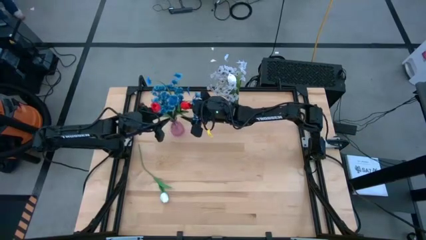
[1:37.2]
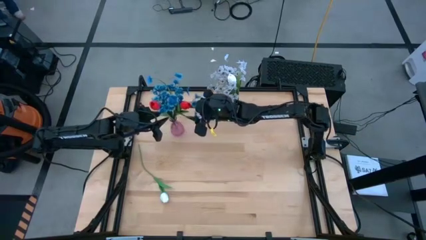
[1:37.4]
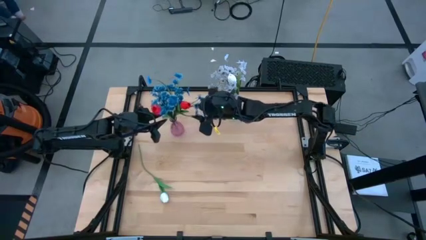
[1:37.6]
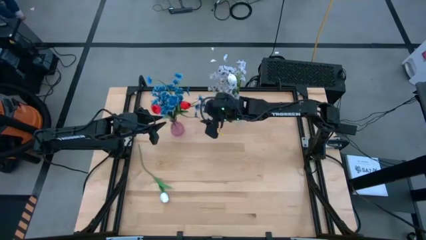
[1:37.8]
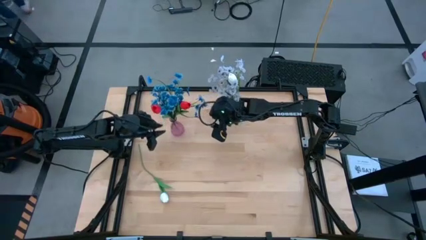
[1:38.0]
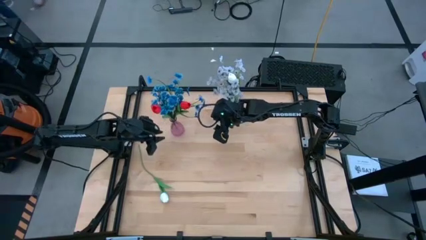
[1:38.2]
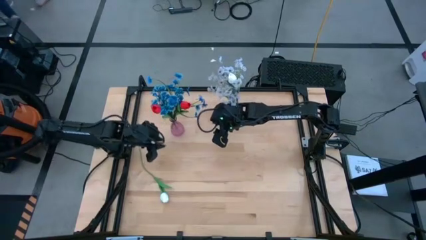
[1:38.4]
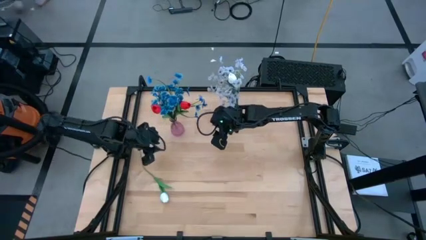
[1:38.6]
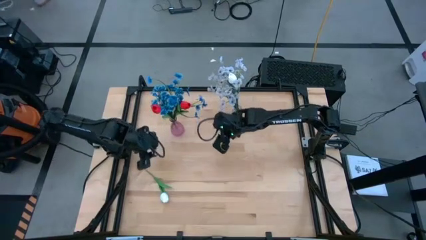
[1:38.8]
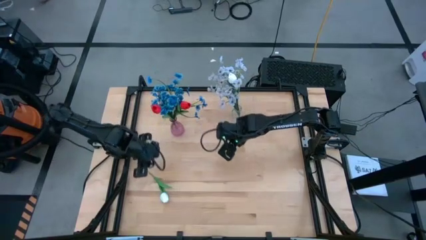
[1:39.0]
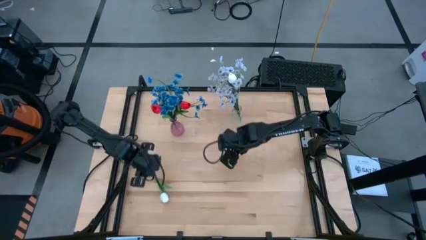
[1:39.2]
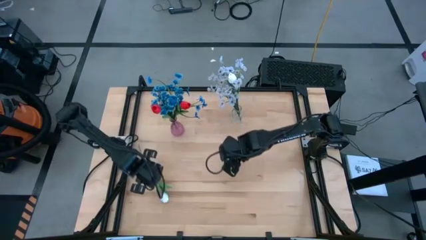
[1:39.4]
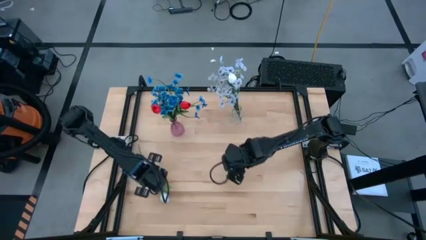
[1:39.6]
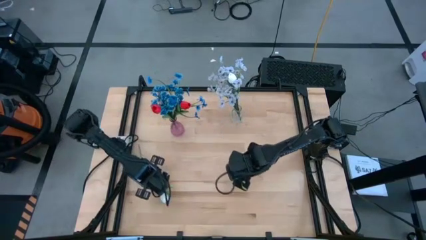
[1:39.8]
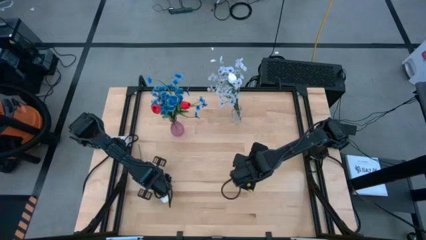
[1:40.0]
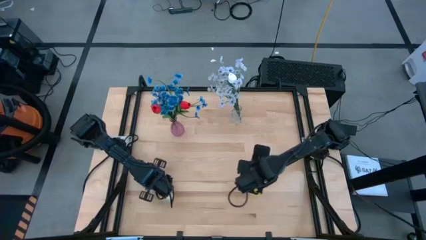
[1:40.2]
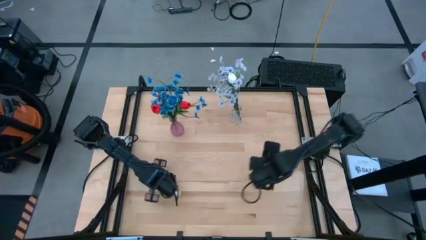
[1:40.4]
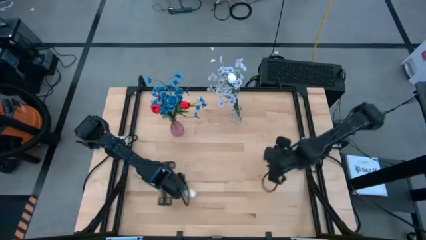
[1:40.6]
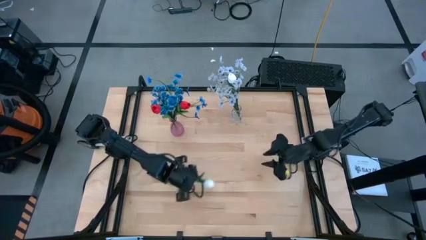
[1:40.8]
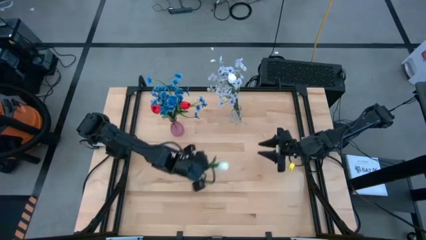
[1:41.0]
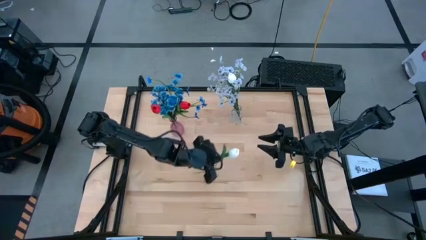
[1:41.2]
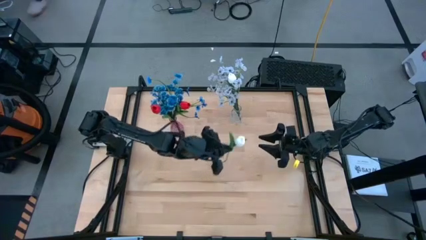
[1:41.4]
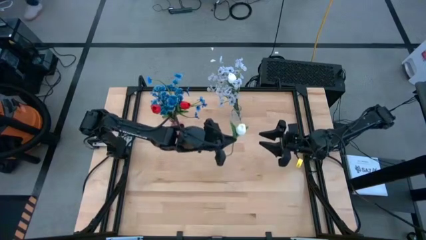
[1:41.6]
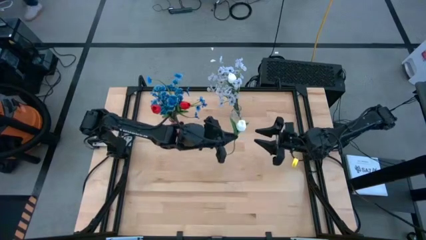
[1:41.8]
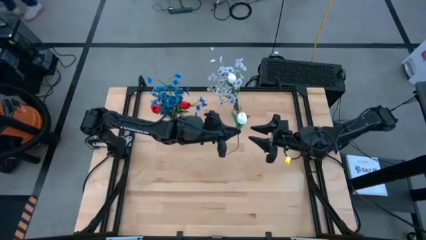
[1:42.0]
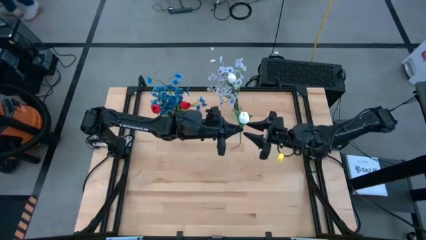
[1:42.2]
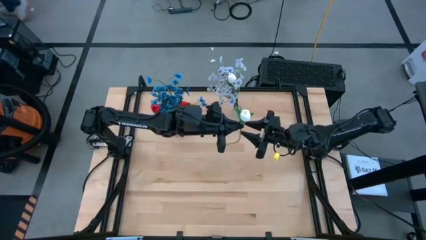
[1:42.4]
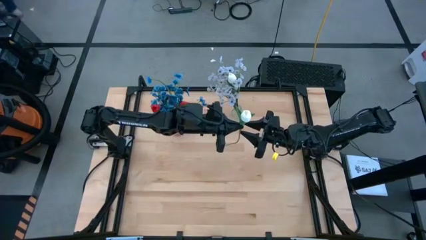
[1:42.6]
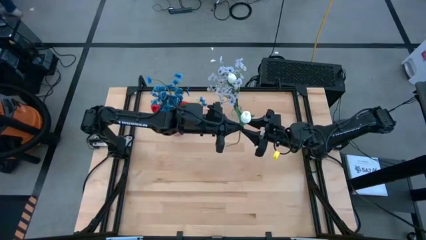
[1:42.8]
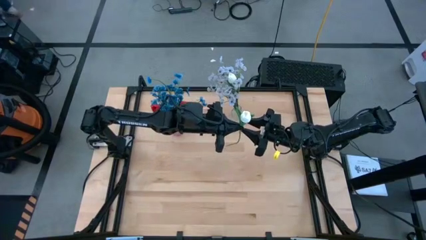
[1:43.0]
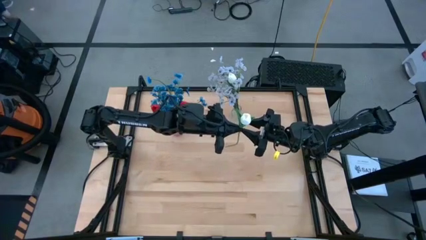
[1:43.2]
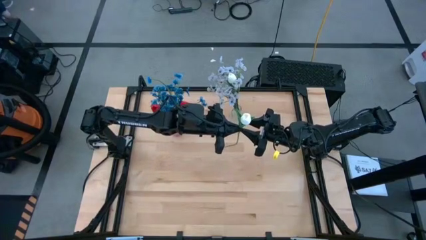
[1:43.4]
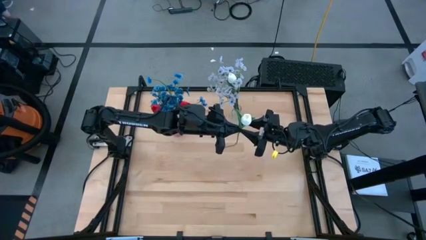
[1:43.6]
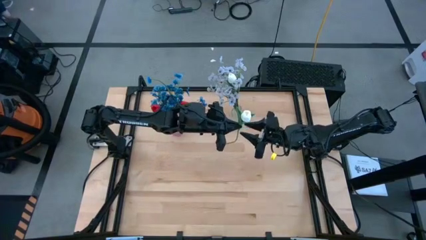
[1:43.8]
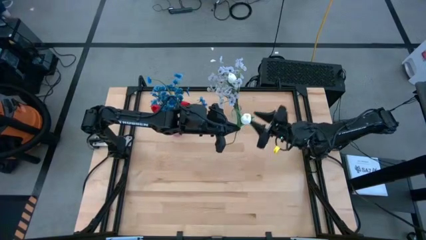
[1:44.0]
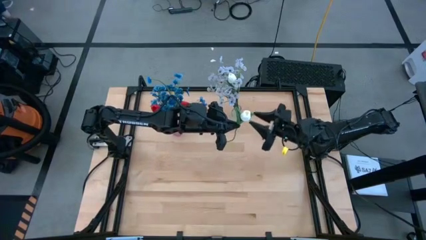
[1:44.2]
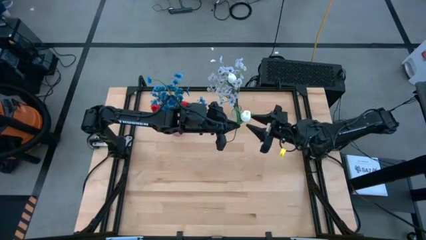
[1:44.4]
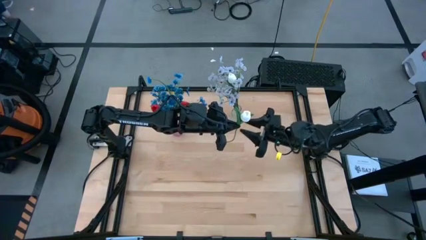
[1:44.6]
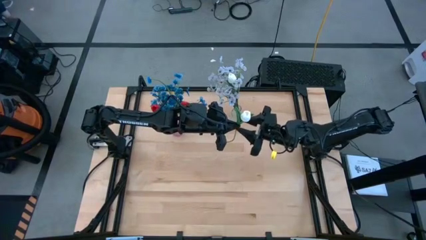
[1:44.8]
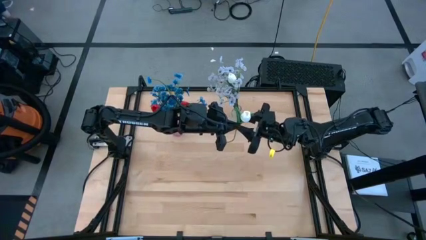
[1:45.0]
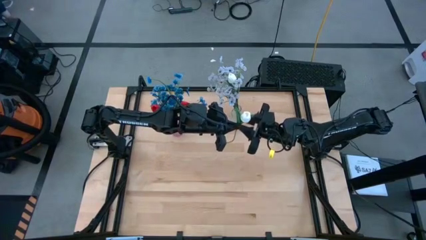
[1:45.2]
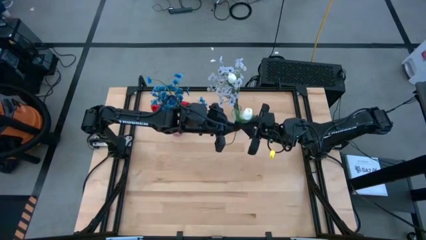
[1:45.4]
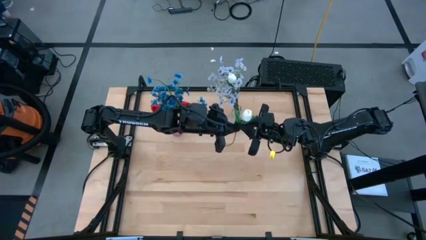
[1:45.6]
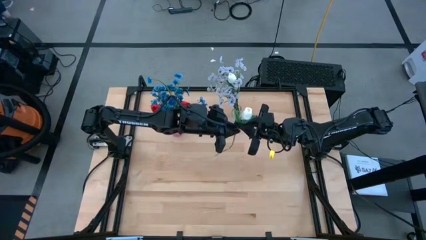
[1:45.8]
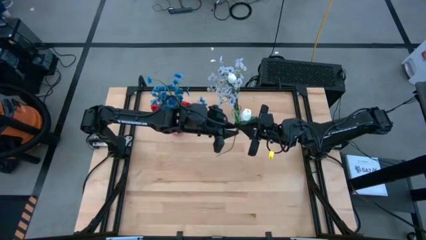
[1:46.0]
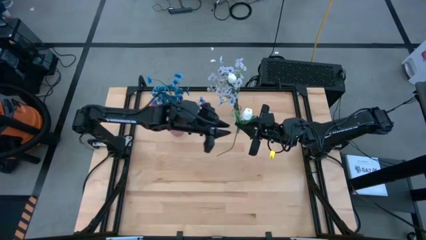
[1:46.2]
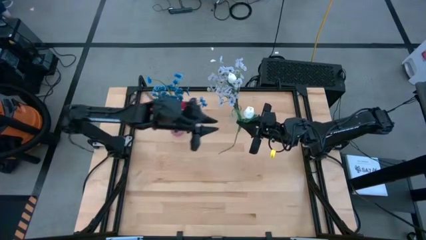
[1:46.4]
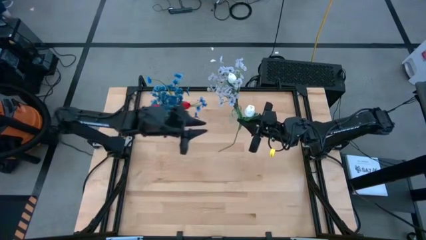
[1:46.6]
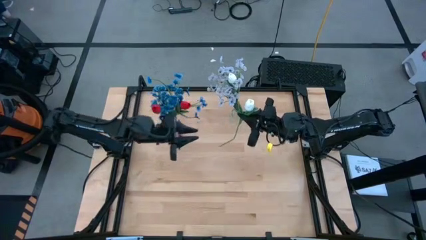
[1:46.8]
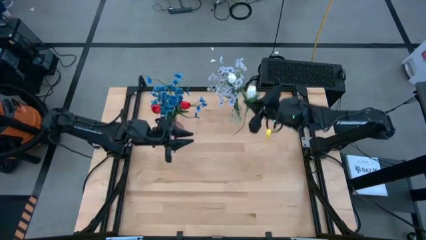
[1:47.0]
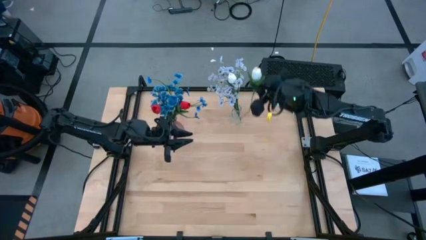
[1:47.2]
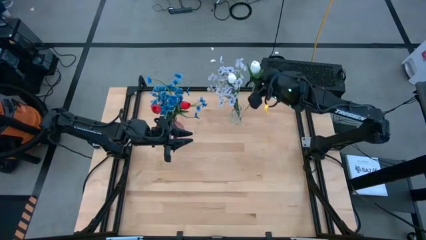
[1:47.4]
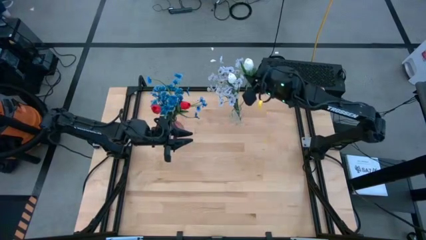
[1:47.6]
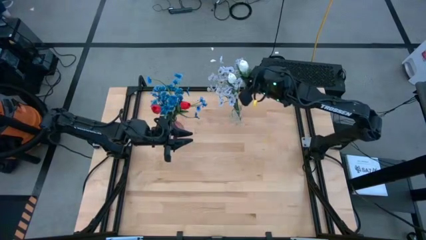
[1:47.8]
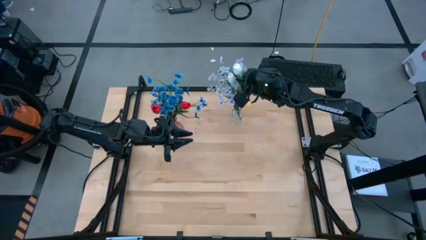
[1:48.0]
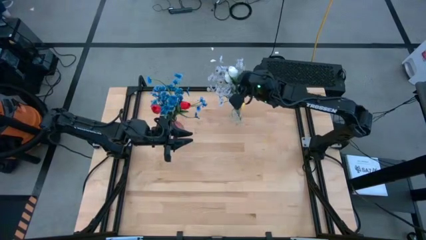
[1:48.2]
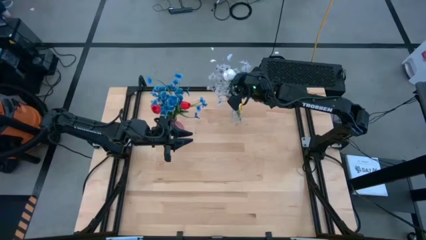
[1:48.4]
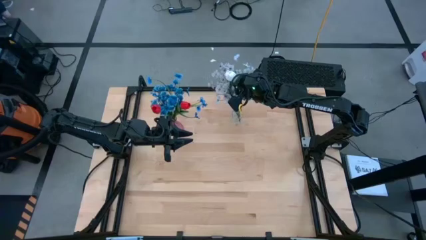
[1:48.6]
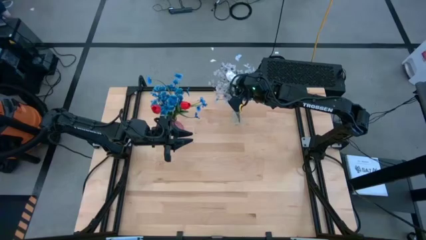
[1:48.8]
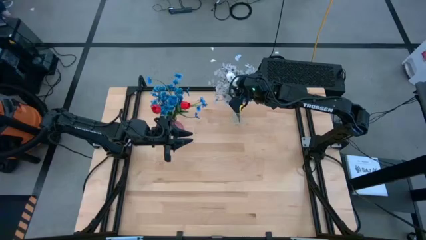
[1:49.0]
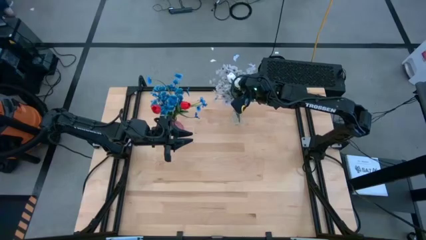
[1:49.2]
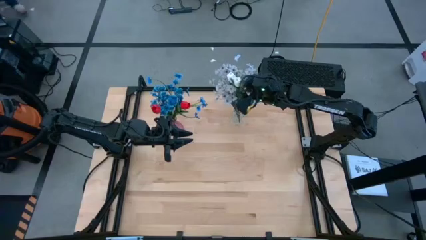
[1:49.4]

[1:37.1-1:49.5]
Task: Sort flowers into vase by color
Put the white tulip into the transparent vase
